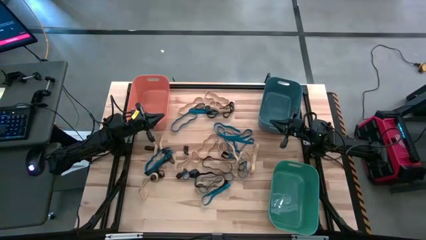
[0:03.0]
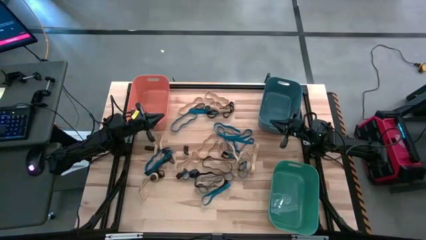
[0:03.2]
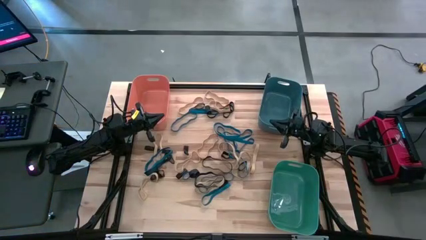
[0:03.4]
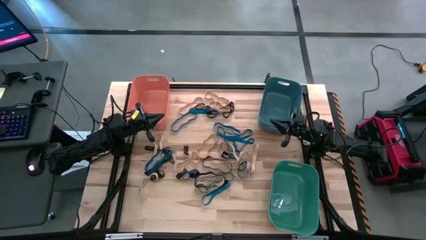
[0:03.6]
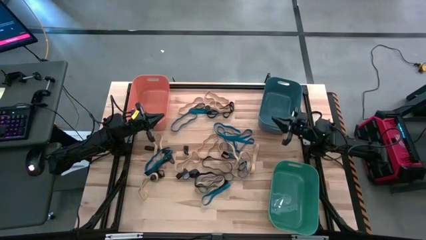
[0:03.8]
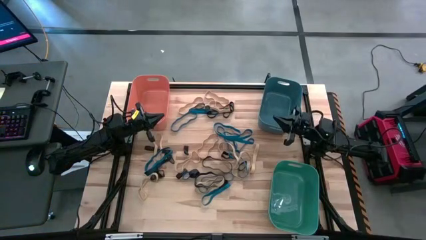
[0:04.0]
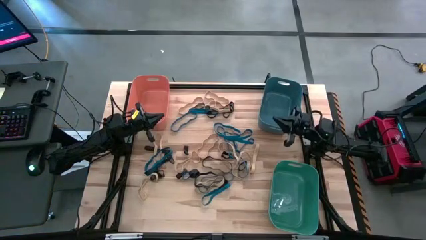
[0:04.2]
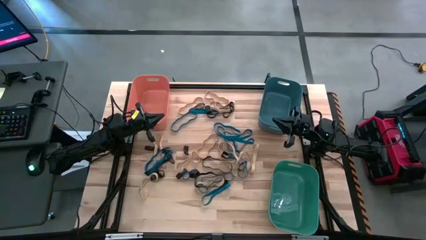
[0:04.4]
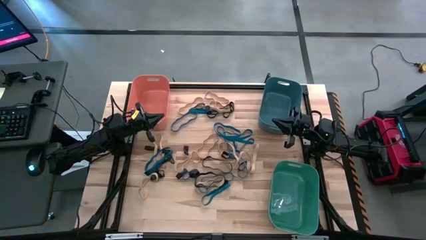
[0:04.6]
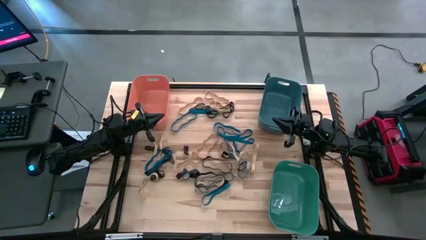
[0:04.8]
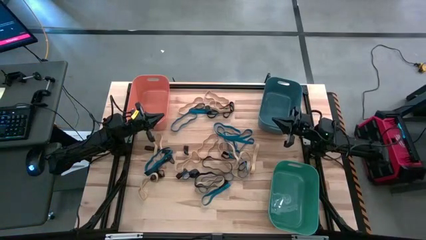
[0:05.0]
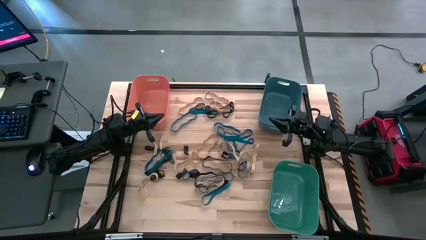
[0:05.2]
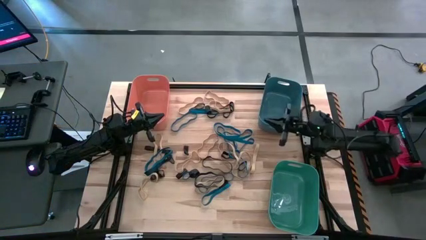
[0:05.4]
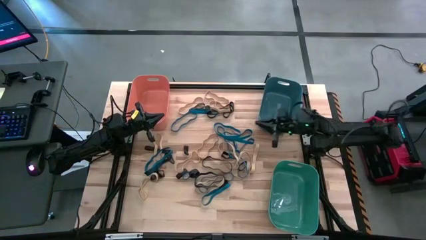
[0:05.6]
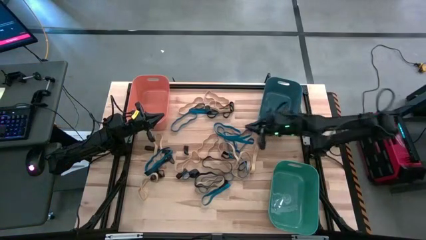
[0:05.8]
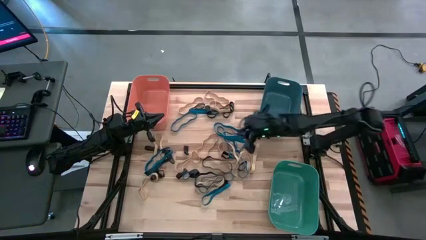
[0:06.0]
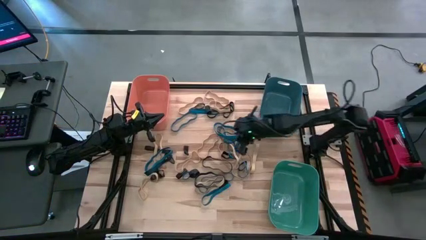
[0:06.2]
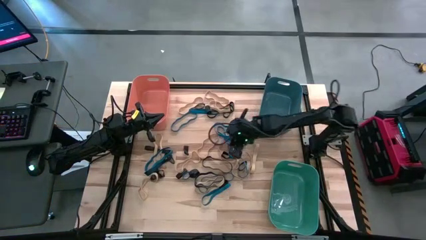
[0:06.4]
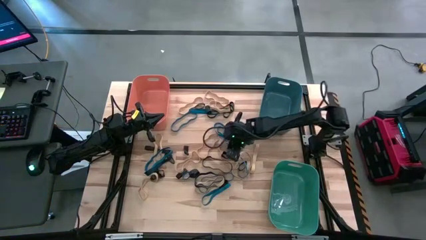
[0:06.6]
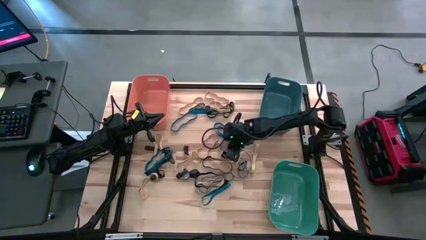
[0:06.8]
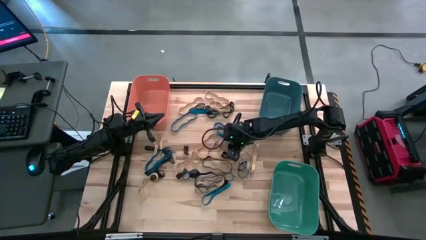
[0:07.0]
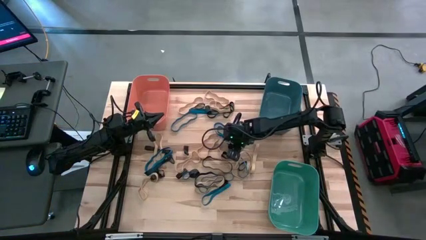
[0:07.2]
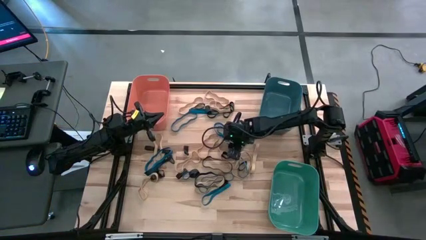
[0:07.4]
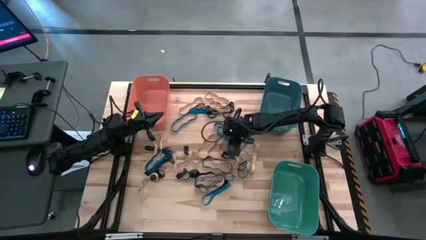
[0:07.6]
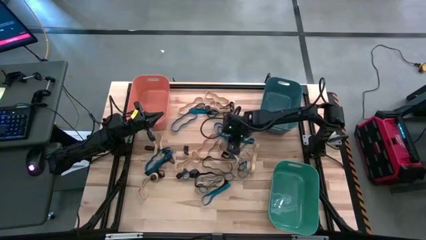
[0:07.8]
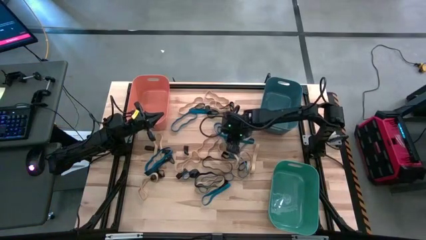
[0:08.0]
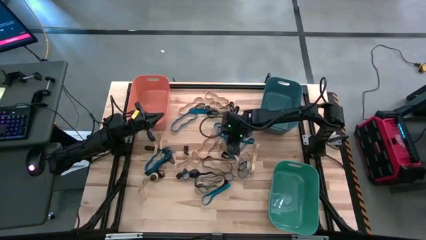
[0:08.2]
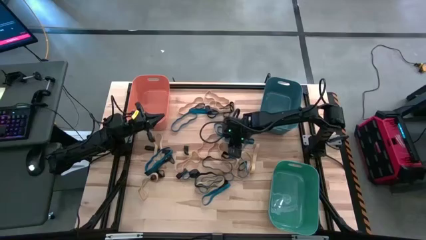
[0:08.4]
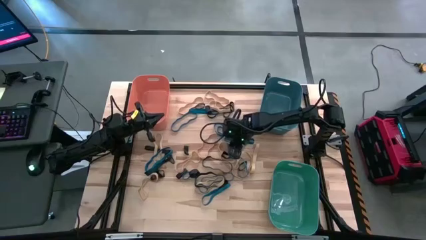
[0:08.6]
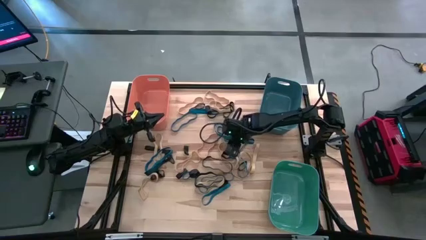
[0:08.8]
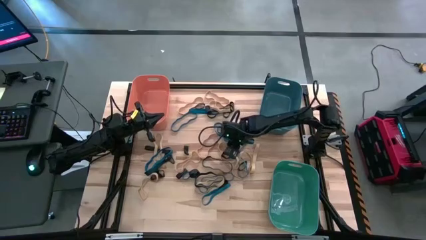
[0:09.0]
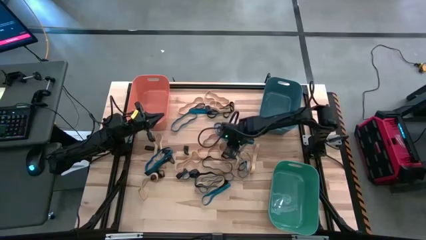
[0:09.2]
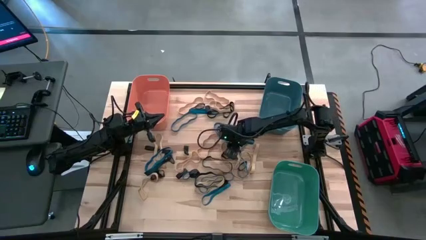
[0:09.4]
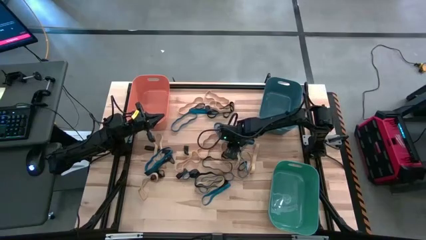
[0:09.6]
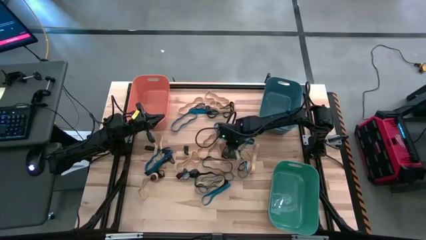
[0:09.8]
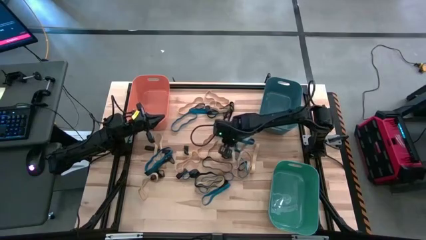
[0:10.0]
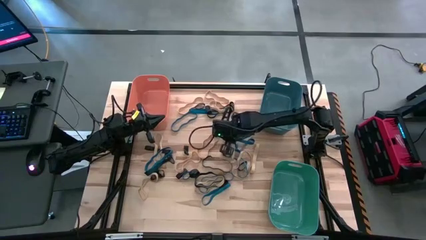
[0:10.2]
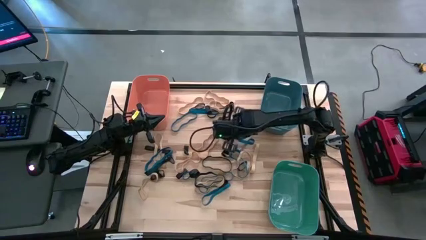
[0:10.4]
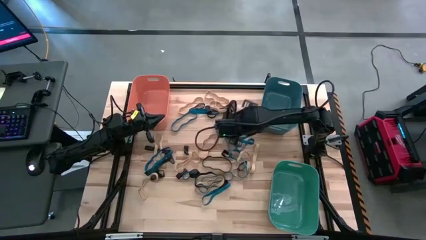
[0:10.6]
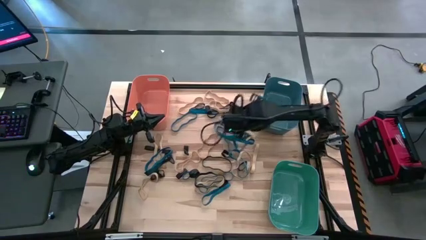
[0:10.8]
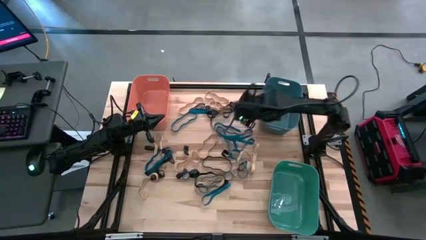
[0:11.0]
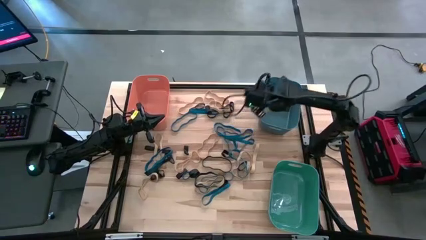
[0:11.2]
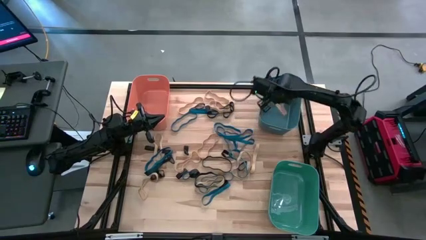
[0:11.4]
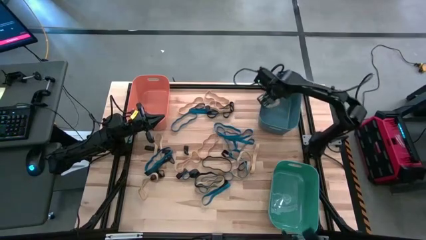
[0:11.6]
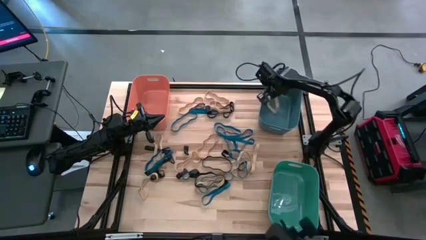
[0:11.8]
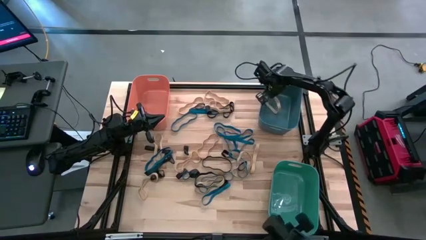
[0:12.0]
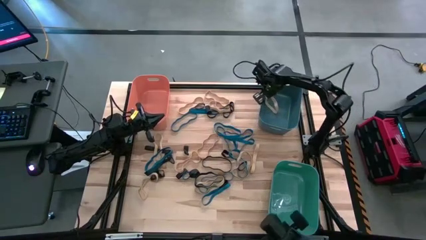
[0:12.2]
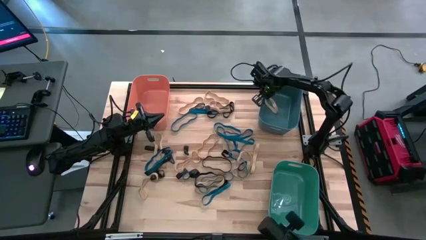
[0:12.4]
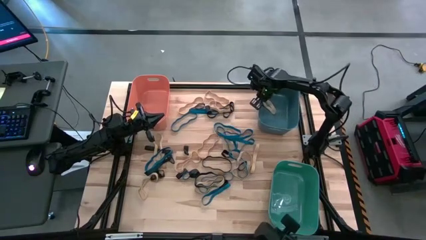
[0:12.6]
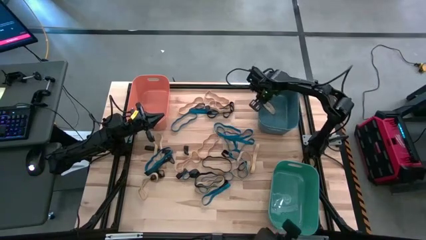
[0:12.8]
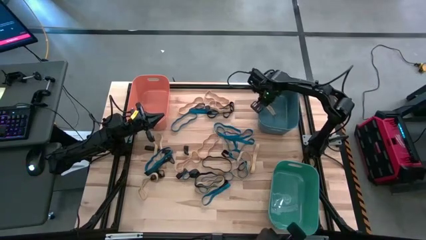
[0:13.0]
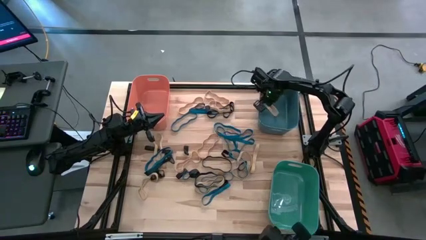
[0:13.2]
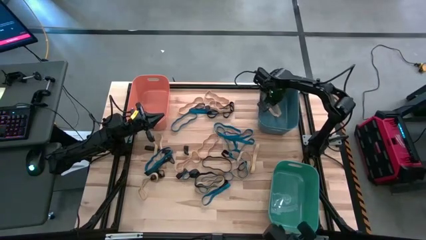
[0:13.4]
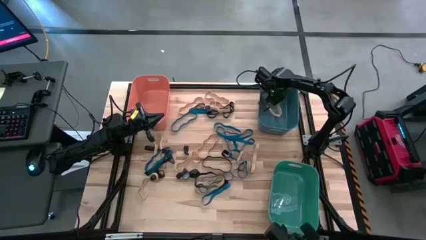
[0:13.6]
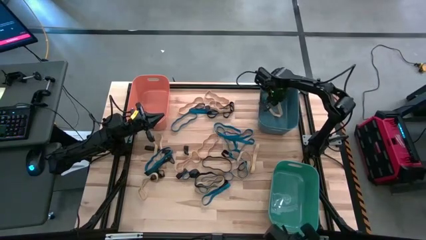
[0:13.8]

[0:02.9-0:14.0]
Task: Sort rubber bands into baskets
Put the white rubber band into the blue bin

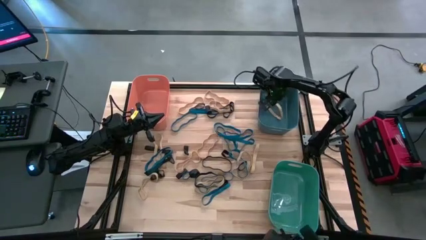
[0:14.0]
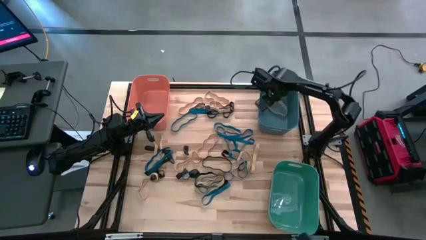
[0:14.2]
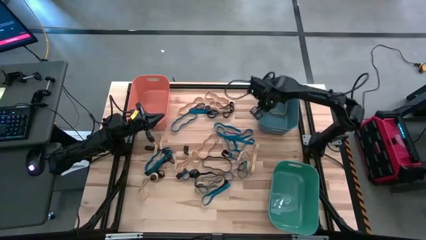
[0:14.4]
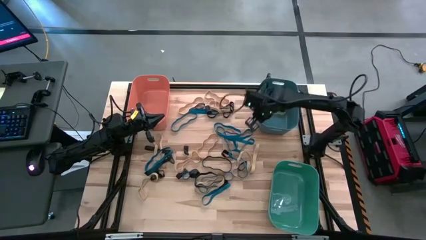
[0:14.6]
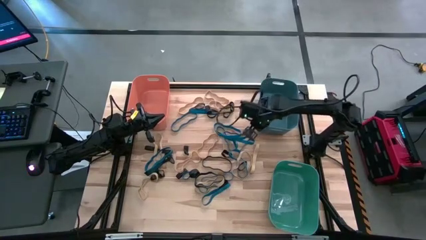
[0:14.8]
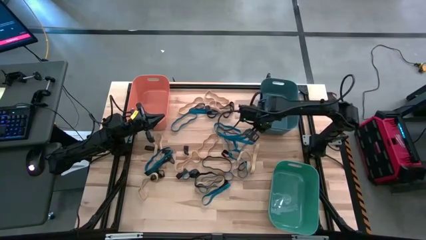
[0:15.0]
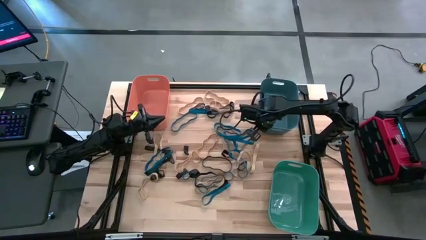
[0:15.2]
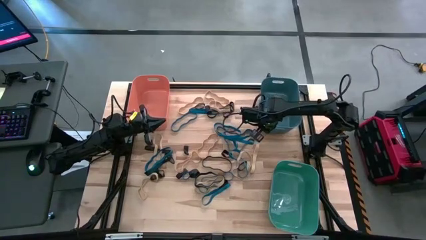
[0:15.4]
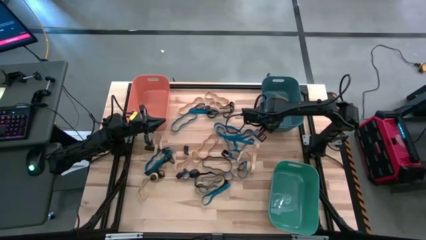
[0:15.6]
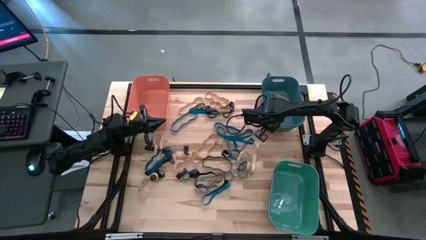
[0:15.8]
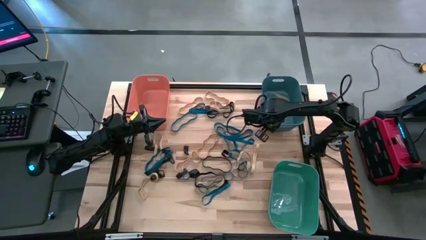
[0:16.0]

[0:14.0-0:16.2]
Adjust the blue bin on the table

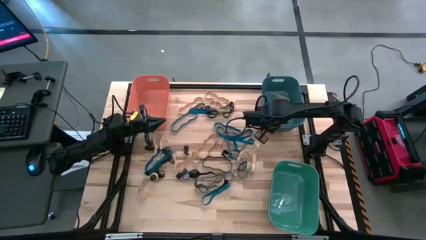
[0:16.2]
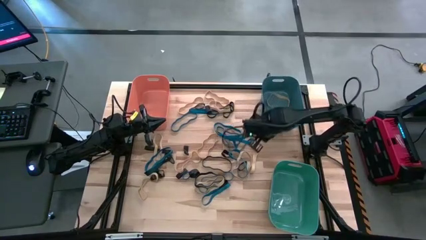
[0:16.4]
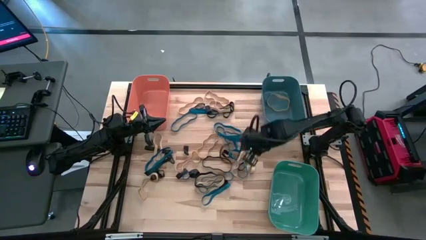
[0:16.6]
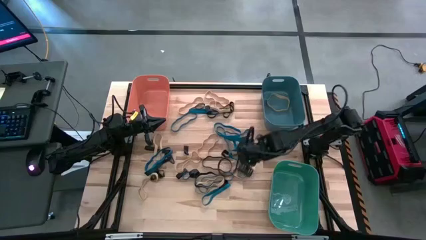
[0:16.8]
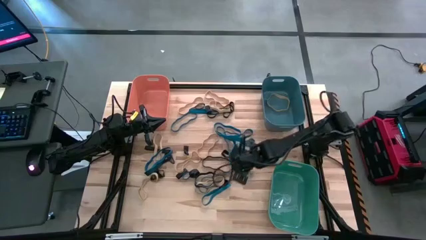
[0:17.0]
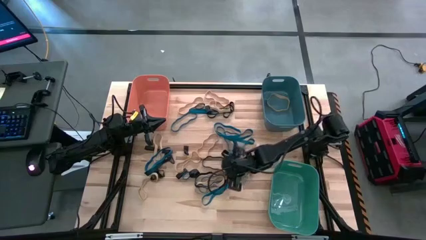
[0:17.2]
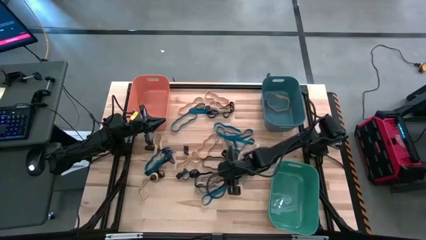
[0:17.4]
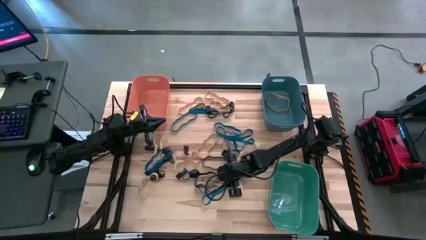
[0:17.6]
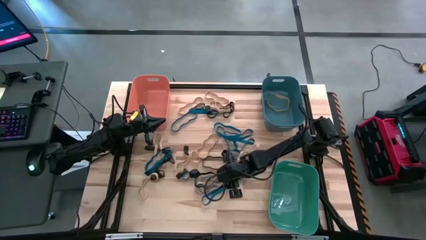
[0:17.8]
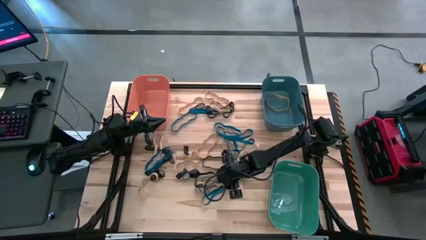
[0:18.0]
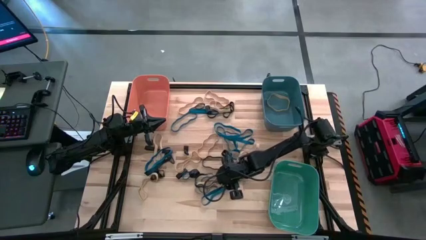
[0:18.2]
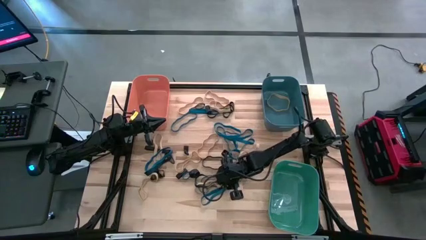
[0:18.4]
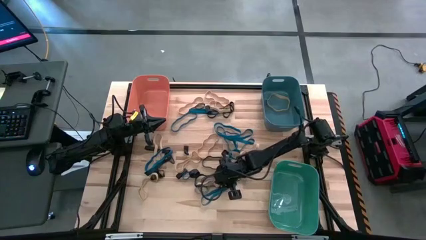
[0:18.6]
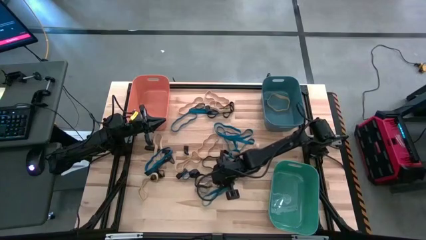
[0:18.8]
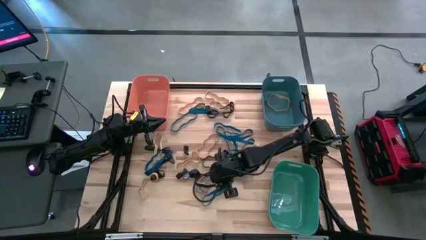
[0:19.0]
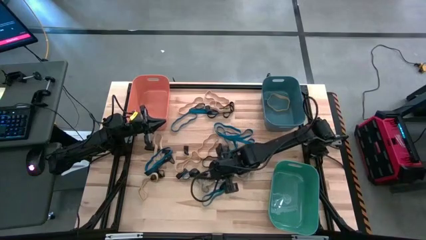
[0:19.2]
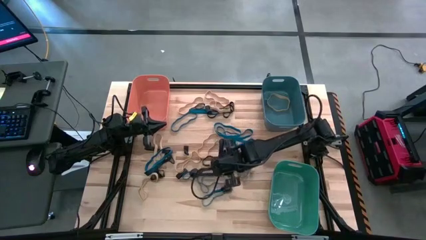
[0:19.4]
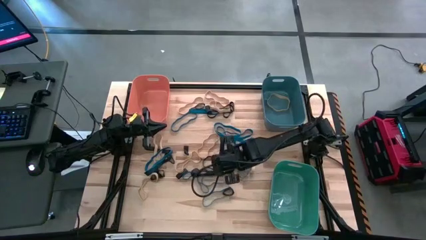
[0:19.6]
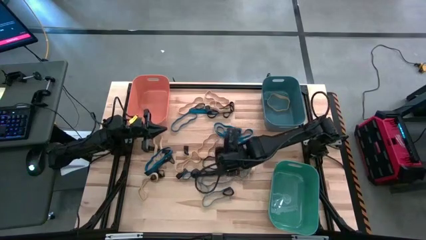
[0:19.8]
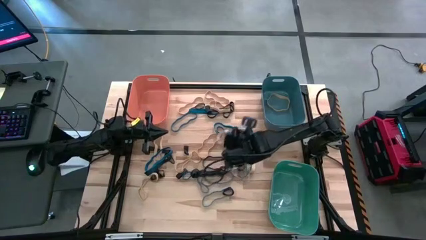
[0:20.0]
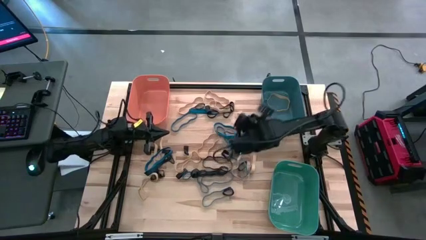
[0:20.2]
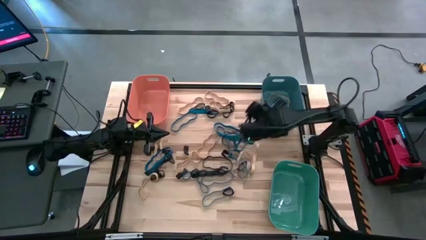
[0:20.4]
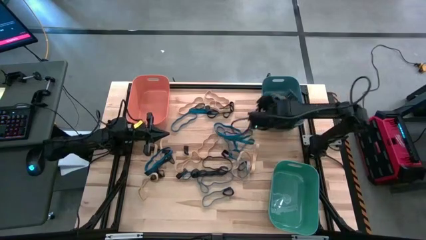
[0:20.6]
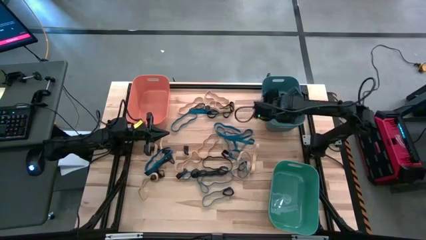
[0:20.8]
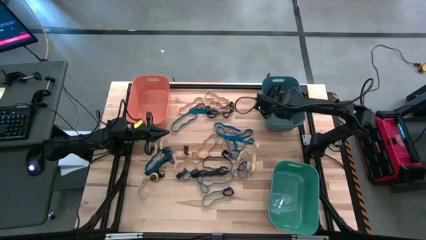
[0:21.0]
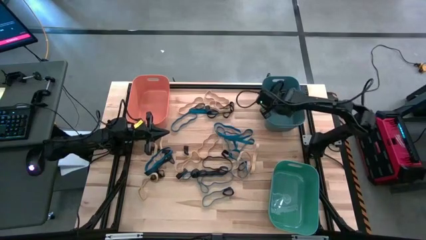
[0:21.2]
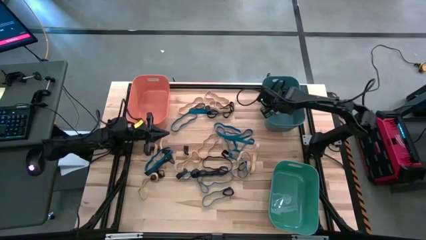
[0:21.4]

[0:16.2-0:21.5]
Put the white rubber band into the blue bin
